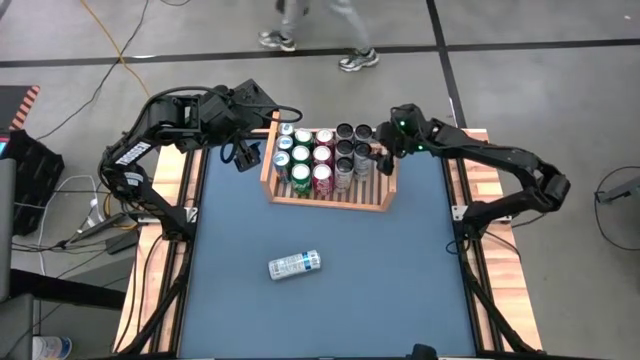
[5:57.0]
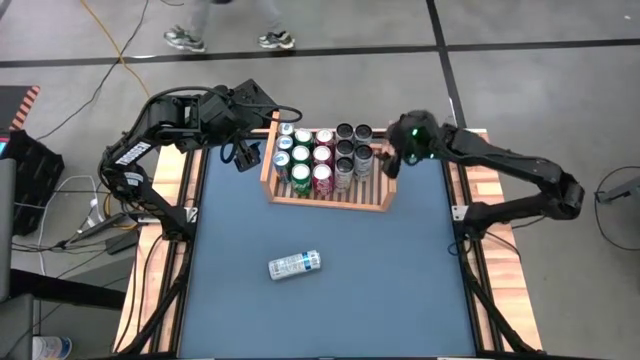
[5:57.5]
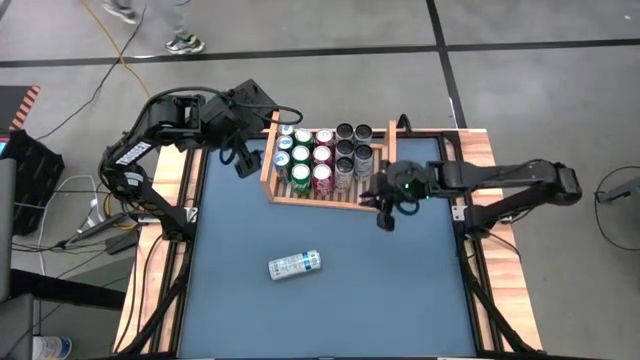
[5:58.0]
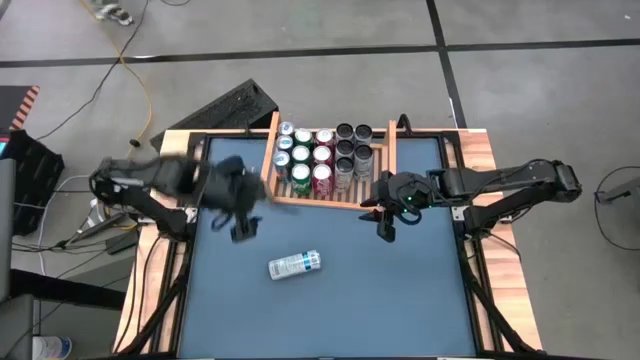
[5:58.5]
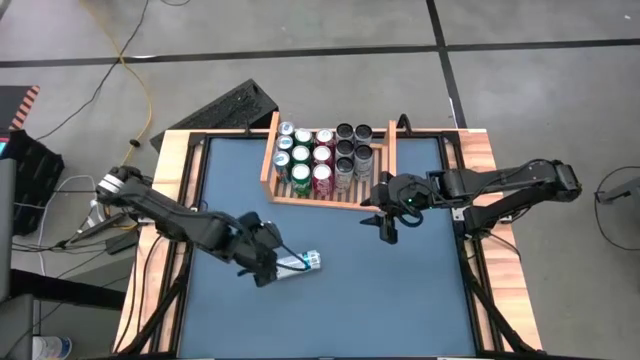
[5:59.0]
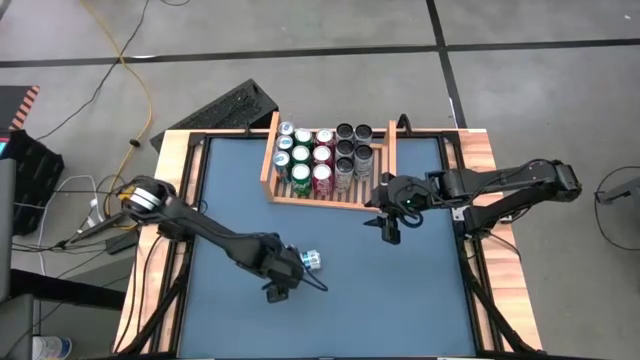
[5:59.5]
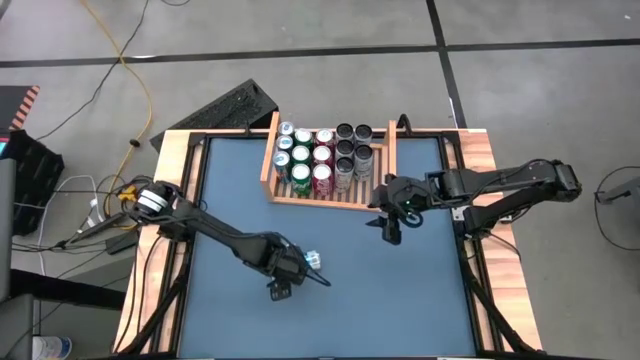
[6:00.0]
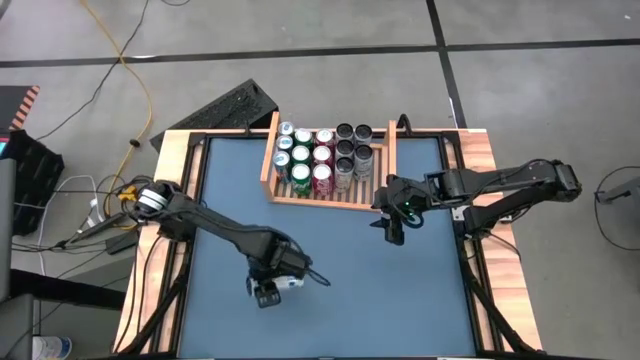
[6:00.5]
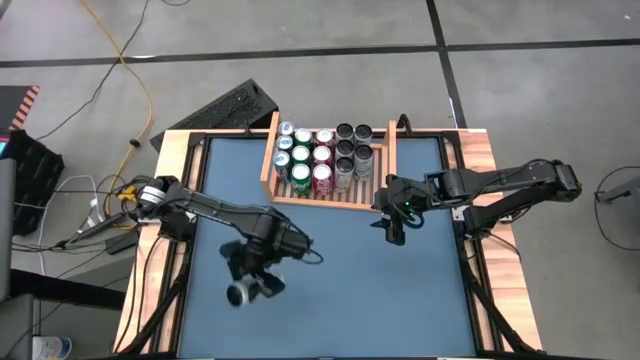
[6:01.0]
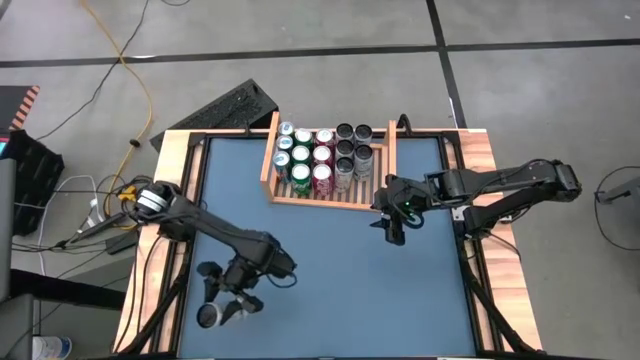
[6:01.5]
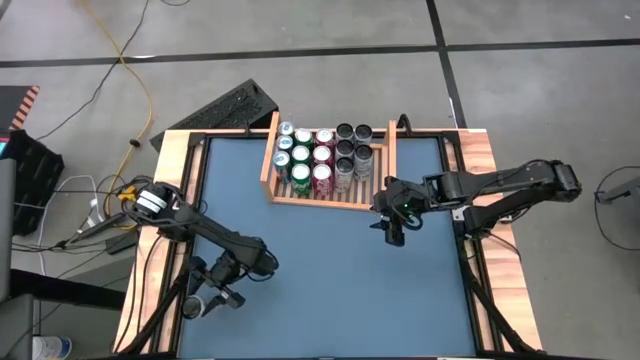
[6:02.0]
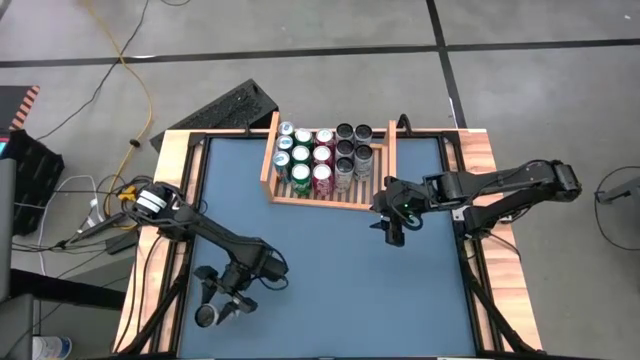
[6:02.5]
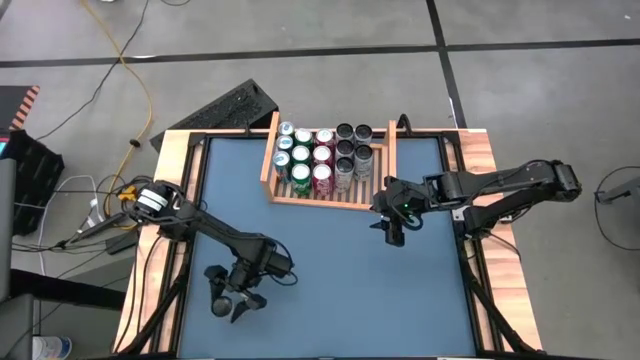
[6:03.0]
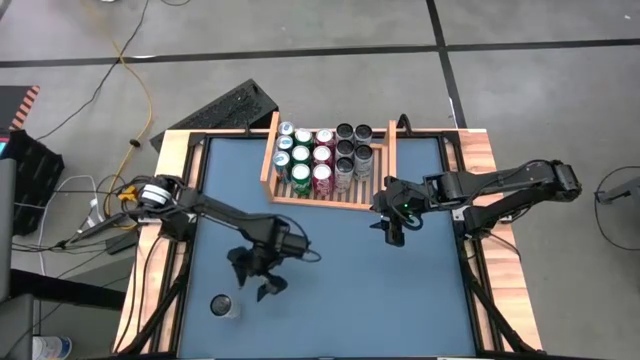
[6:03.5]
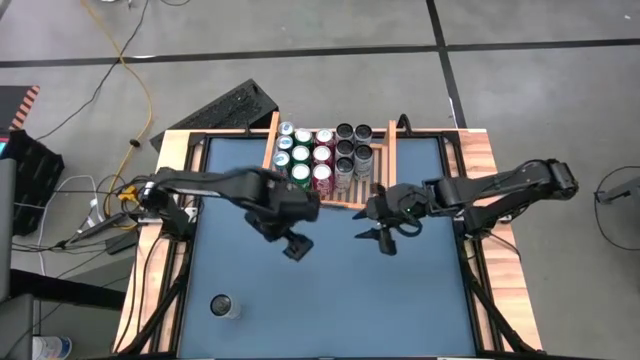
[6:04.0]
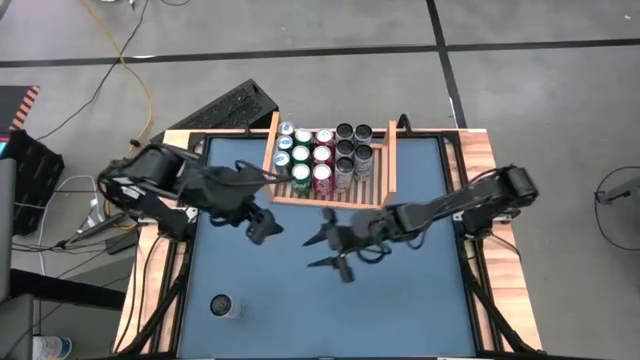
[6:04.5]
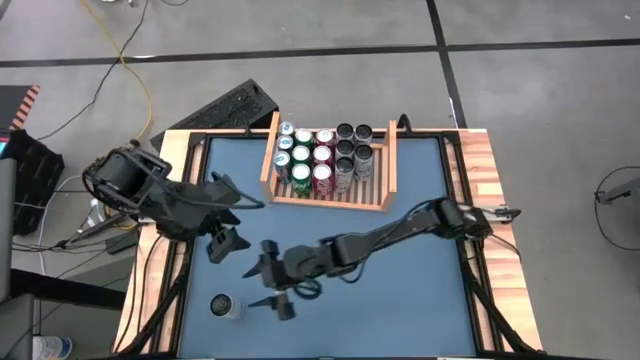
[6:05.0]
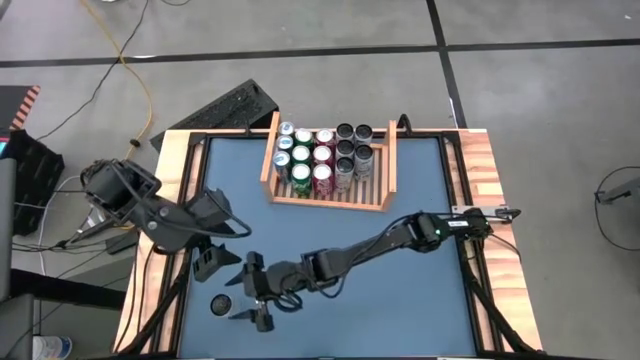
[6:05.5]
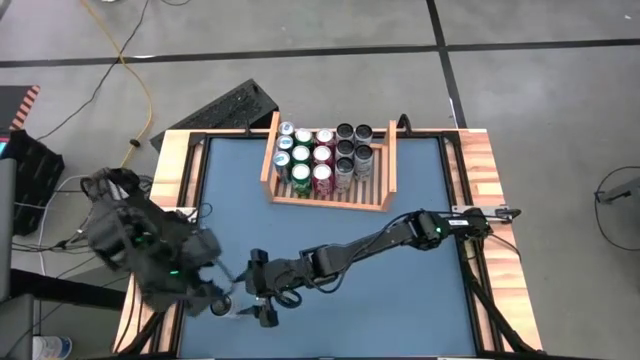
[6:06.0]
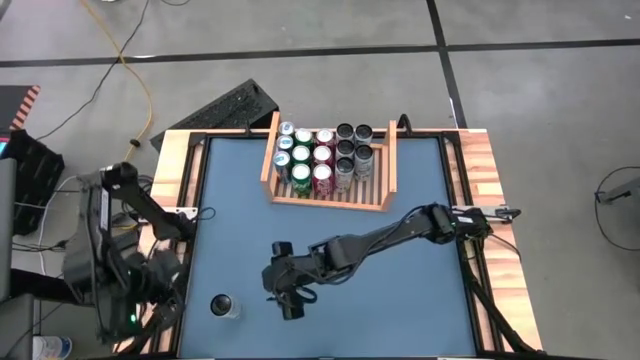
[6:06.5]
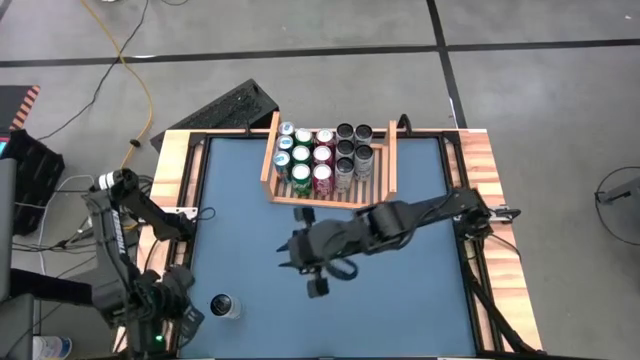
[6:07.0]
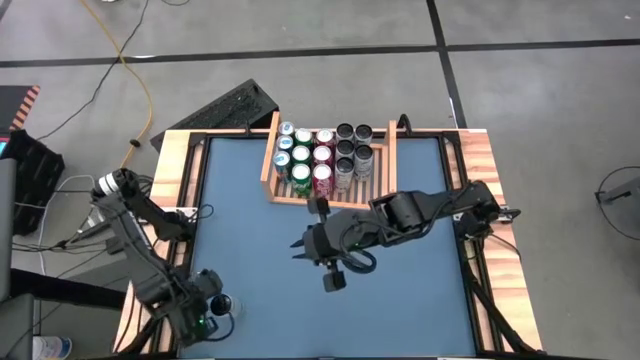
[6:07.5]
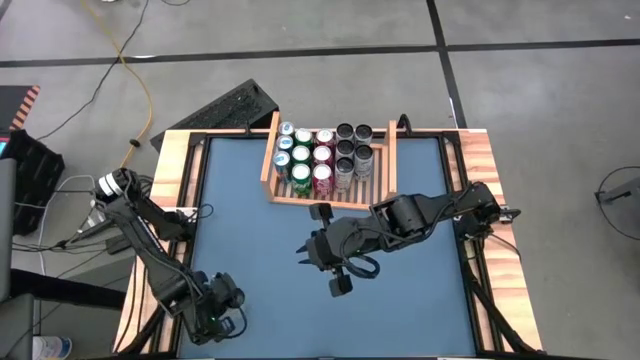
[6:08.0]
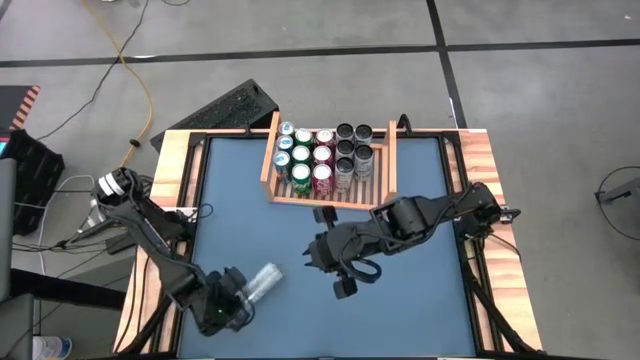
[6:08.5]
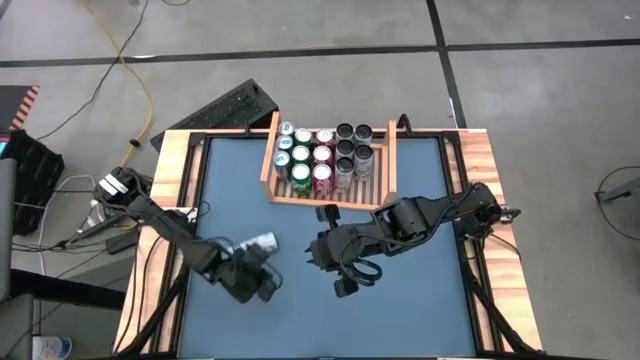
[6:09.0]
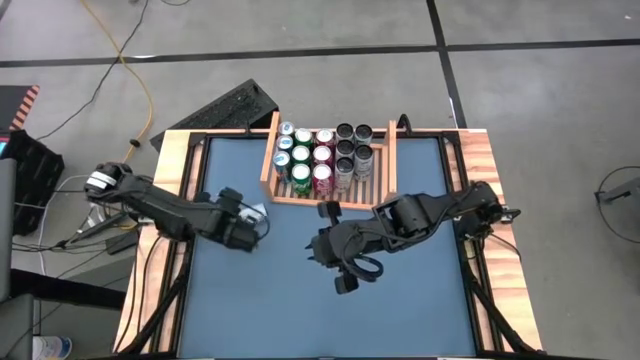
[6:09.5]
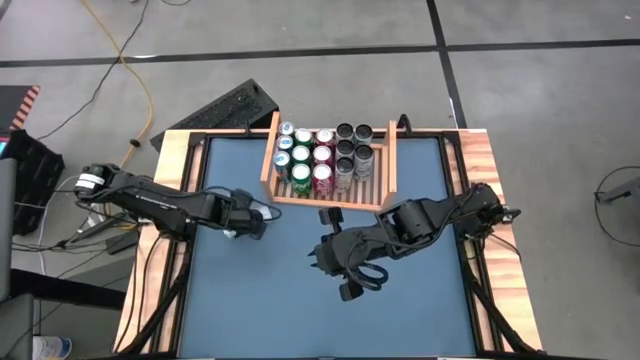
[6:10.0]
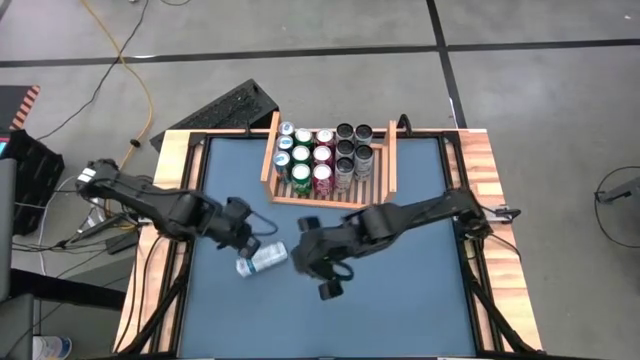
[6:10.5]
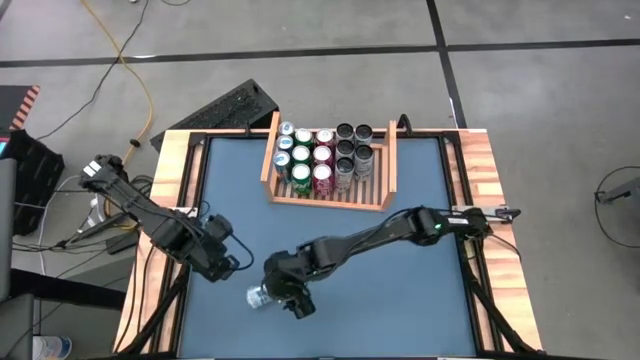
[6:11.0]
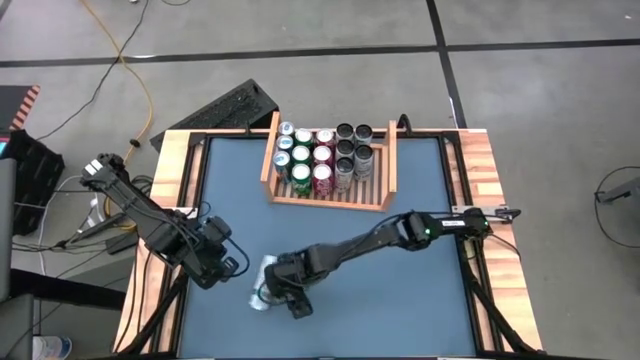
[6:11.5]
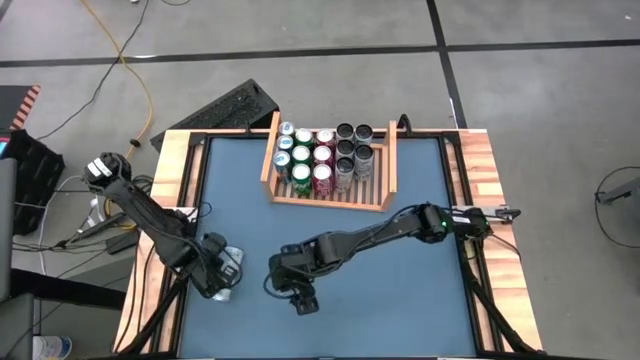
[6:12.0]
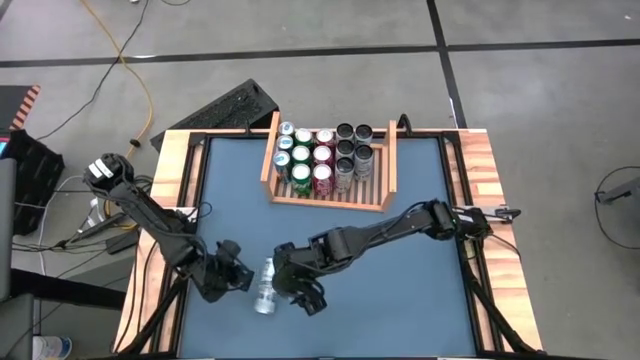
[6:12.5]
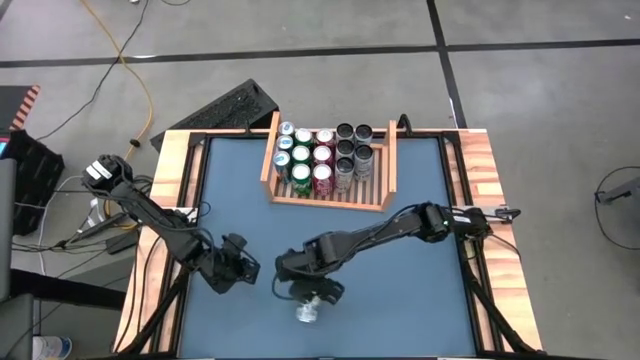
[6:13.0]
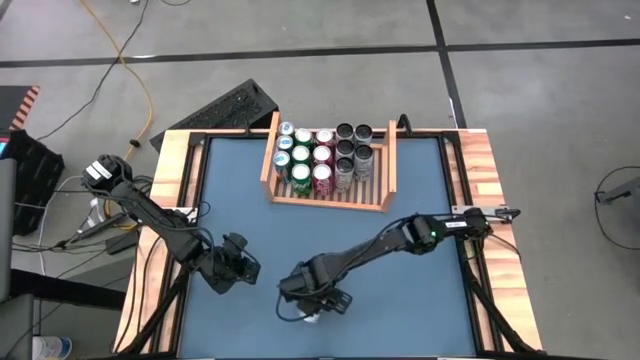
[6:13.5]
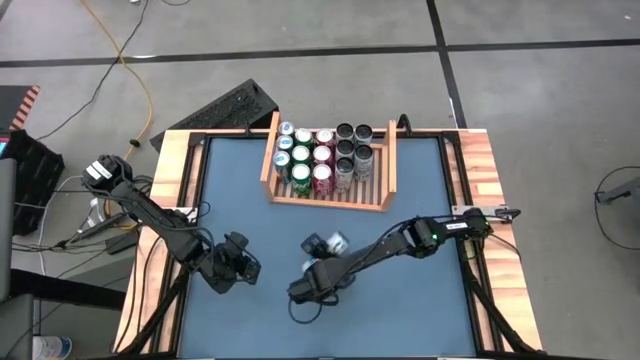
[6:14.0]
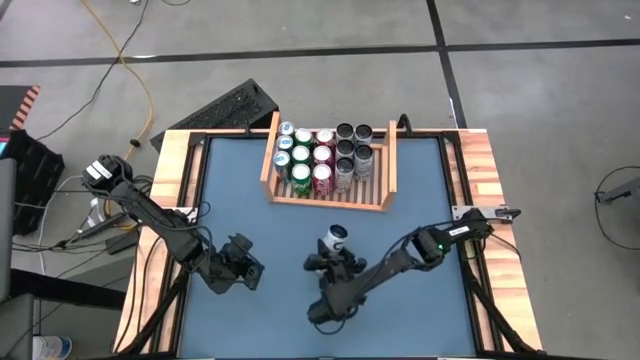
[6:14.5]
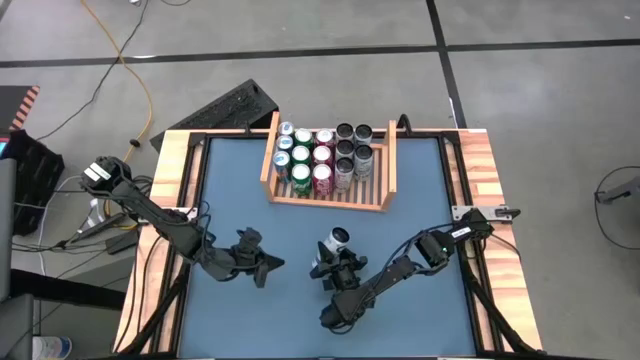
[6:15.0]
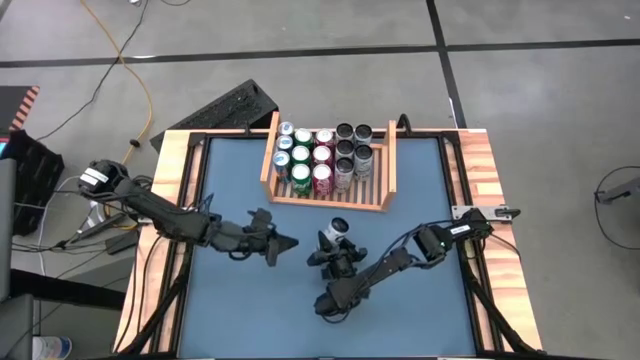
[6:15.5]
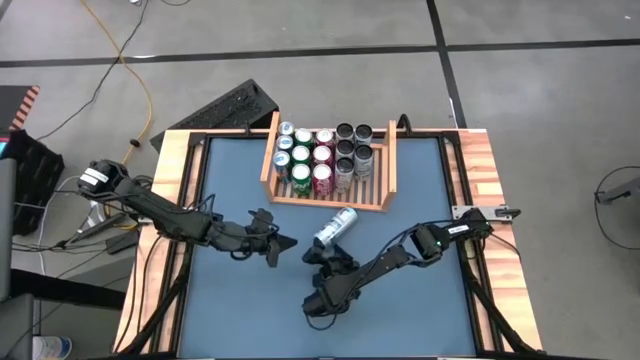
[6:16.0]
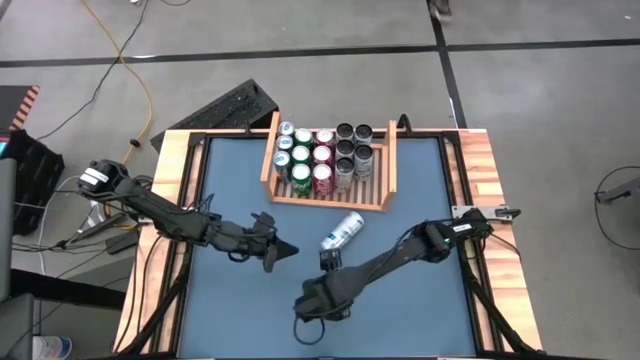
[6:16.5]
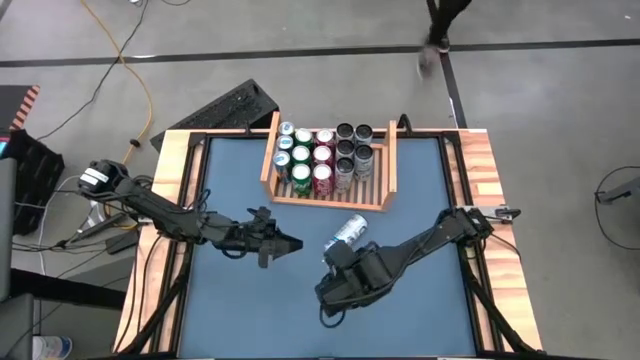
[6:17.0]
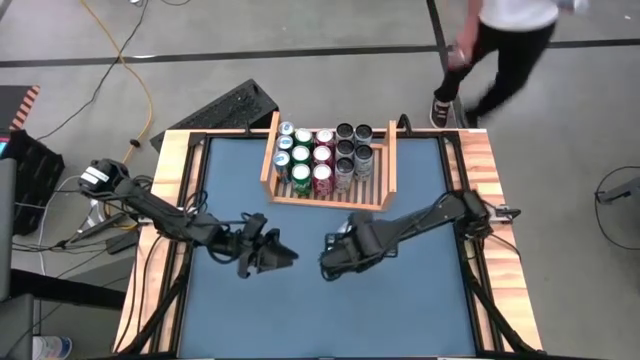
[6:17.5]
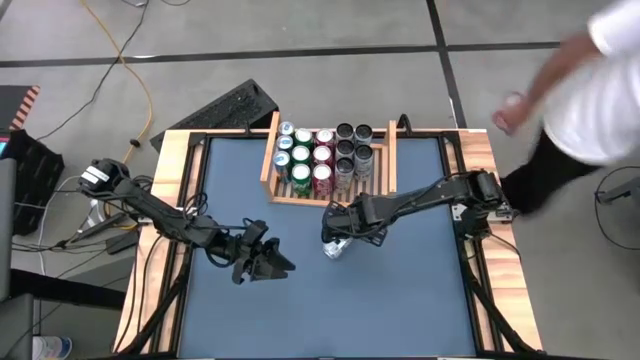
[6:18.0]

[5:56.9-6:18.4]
Task: Place canned beverage on shelf
Put the light blue soda can on the shelf
